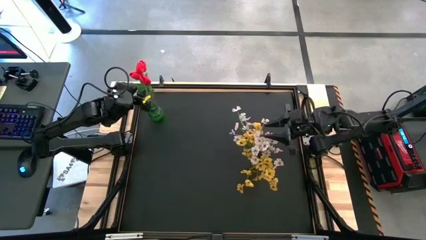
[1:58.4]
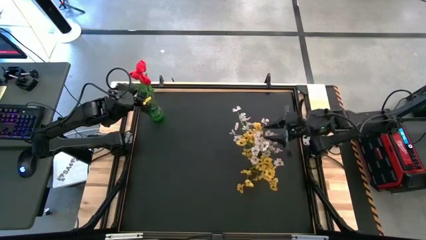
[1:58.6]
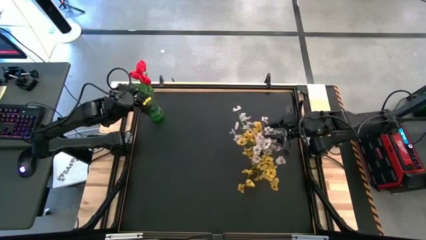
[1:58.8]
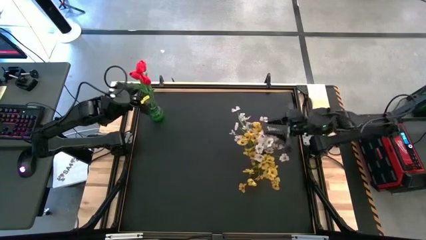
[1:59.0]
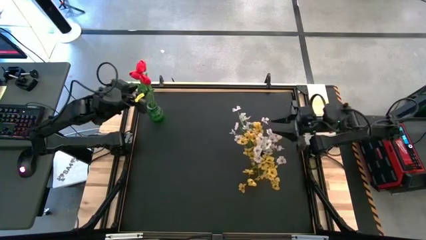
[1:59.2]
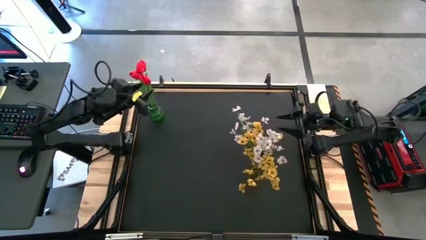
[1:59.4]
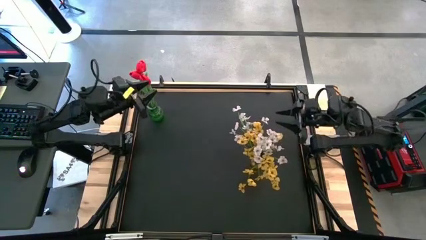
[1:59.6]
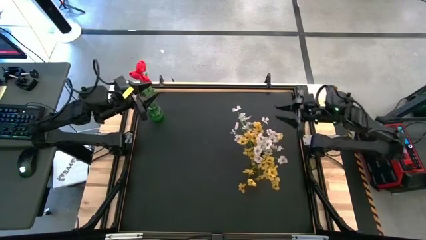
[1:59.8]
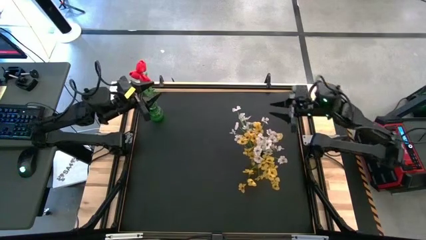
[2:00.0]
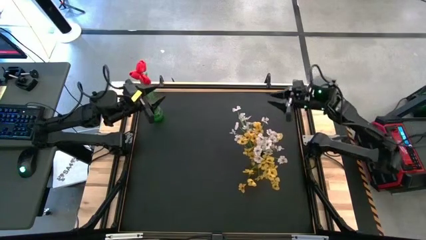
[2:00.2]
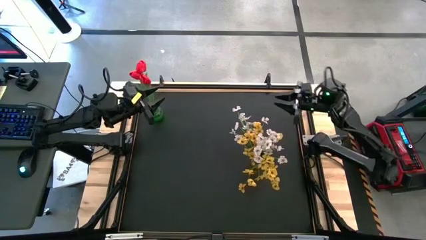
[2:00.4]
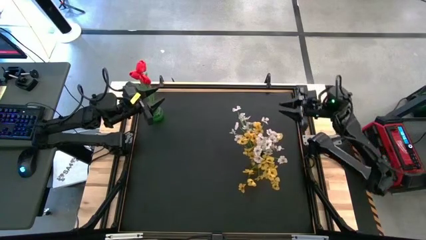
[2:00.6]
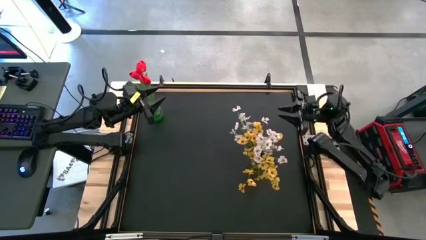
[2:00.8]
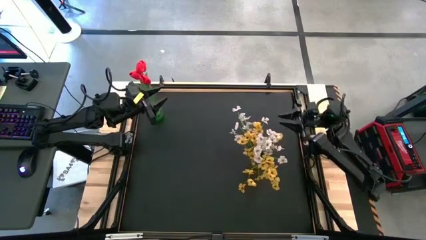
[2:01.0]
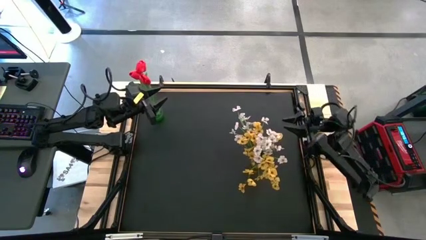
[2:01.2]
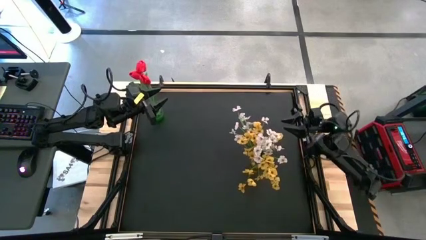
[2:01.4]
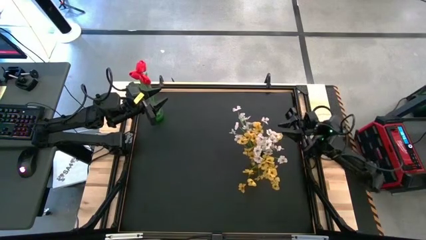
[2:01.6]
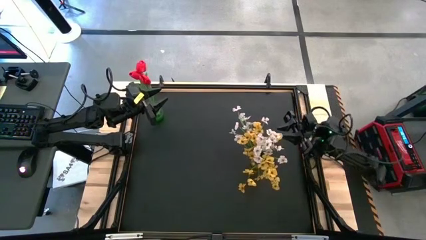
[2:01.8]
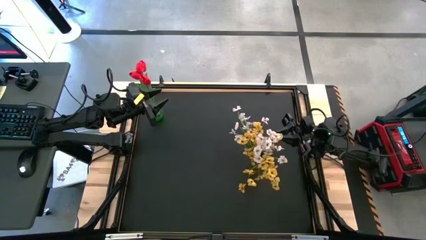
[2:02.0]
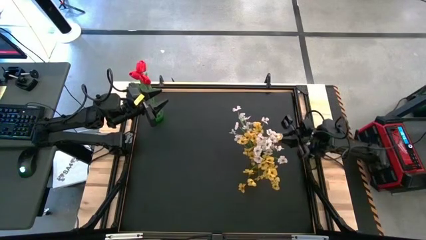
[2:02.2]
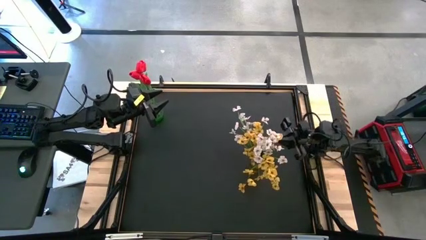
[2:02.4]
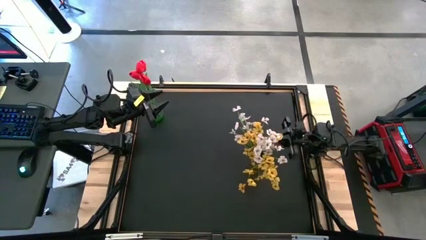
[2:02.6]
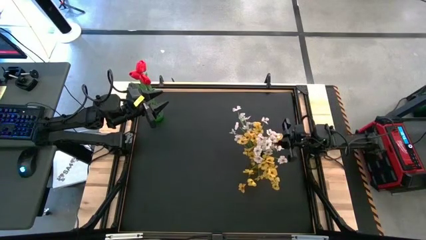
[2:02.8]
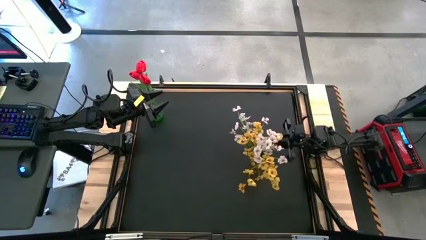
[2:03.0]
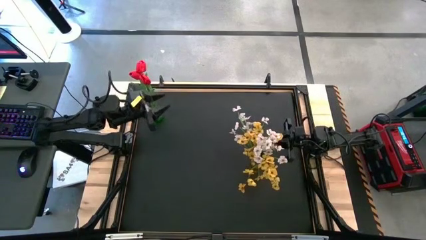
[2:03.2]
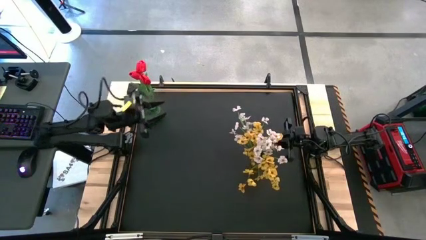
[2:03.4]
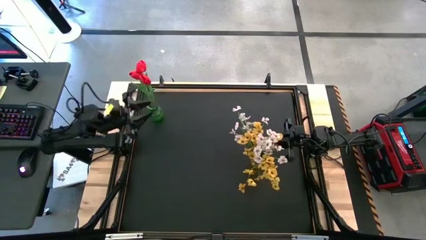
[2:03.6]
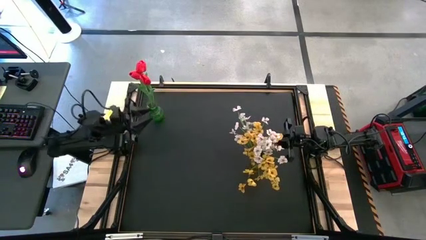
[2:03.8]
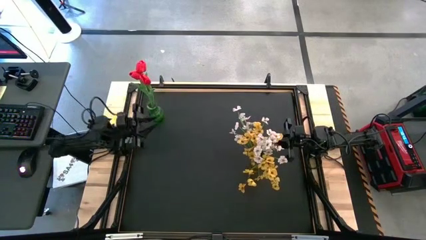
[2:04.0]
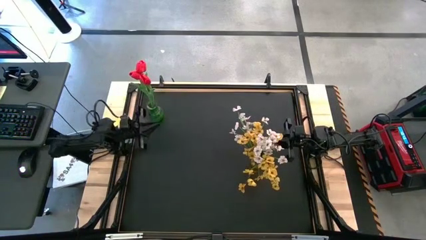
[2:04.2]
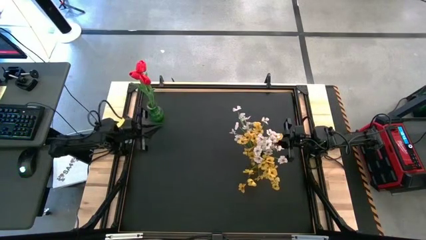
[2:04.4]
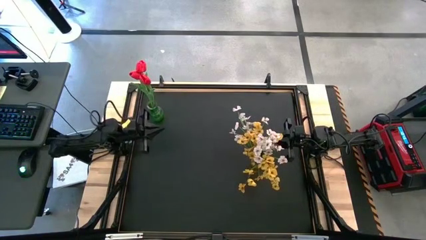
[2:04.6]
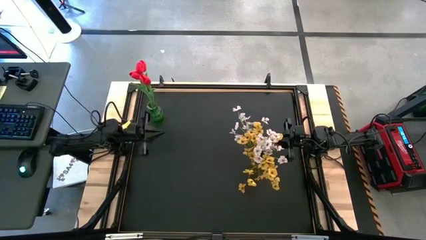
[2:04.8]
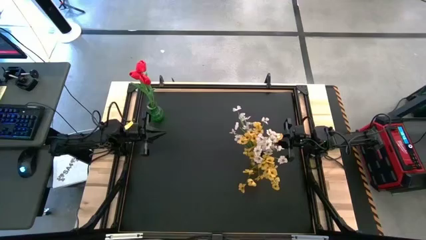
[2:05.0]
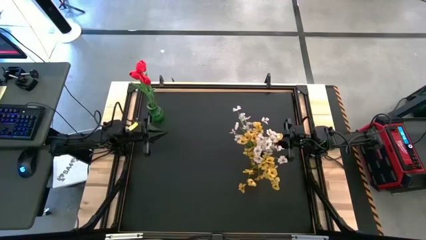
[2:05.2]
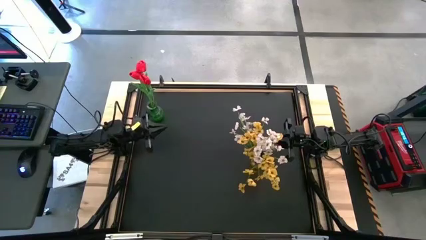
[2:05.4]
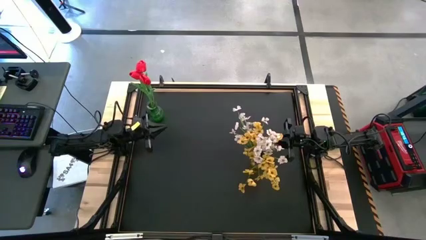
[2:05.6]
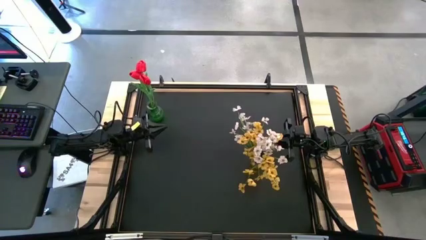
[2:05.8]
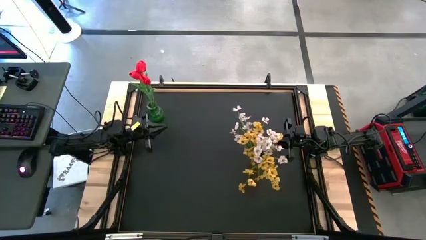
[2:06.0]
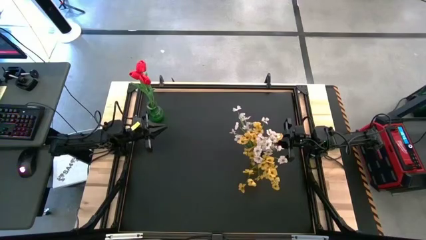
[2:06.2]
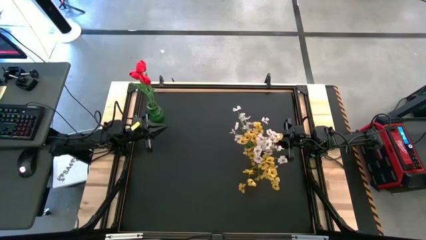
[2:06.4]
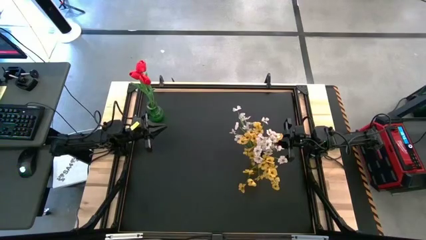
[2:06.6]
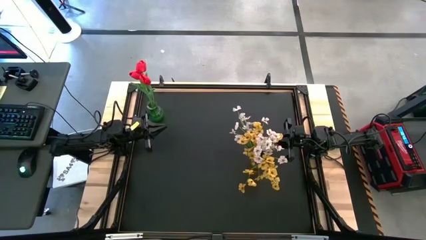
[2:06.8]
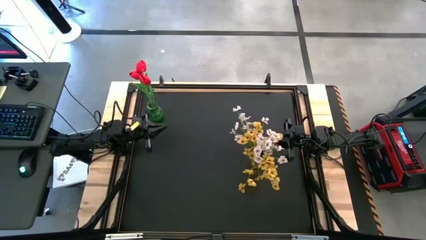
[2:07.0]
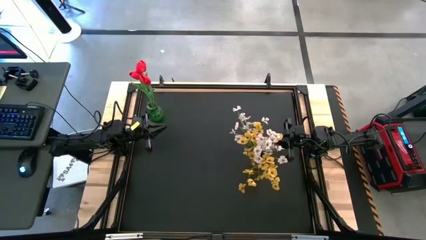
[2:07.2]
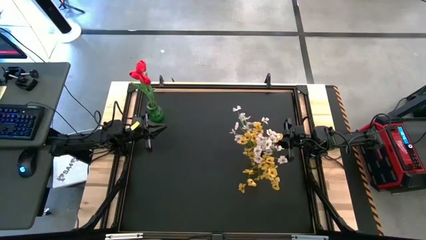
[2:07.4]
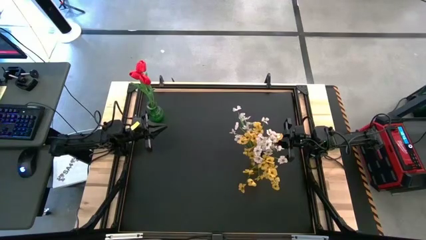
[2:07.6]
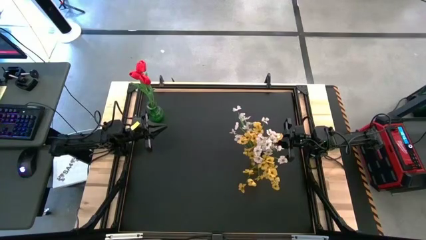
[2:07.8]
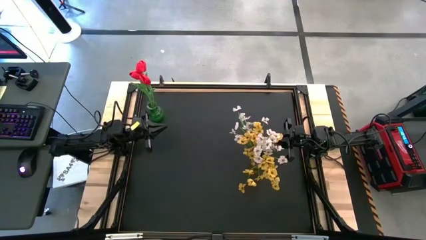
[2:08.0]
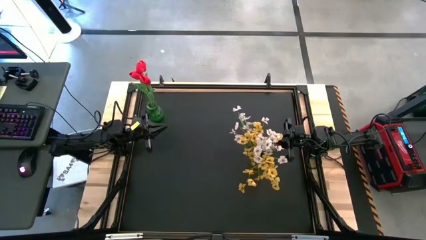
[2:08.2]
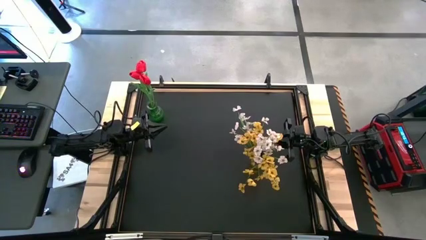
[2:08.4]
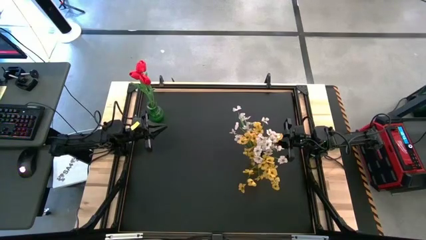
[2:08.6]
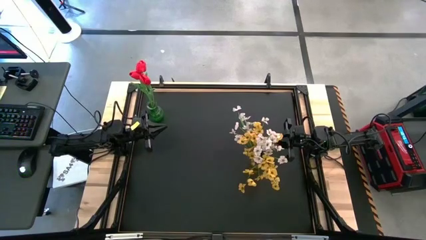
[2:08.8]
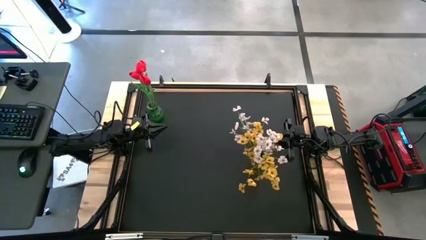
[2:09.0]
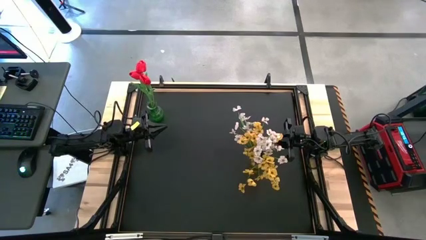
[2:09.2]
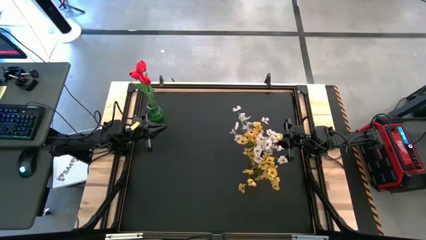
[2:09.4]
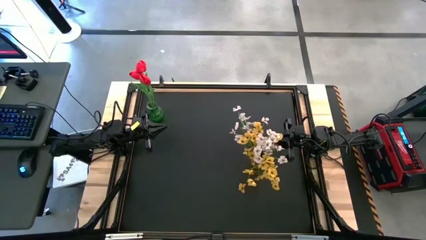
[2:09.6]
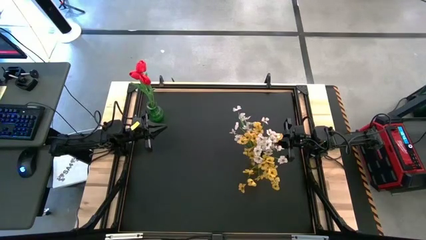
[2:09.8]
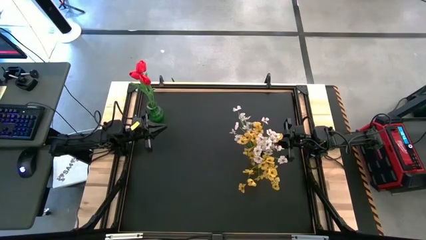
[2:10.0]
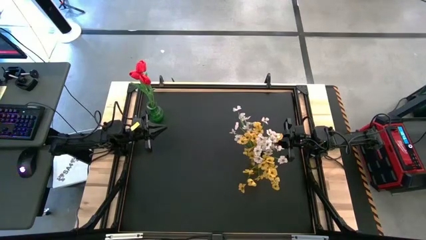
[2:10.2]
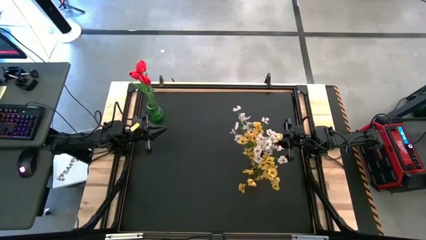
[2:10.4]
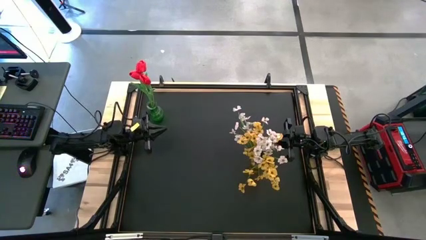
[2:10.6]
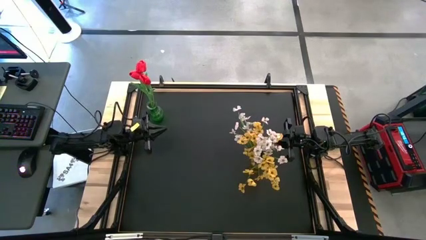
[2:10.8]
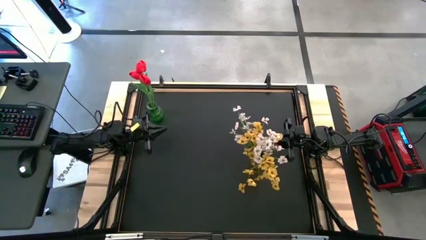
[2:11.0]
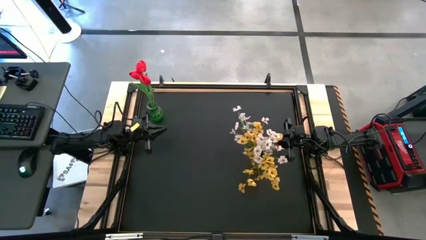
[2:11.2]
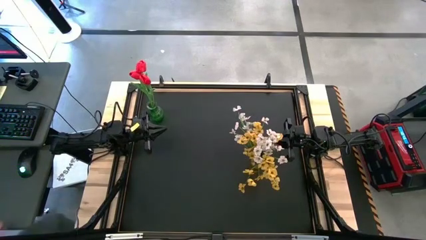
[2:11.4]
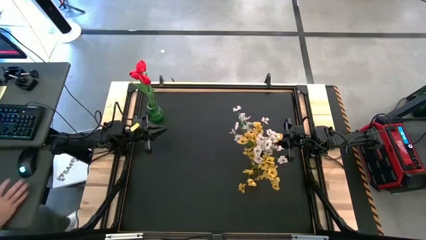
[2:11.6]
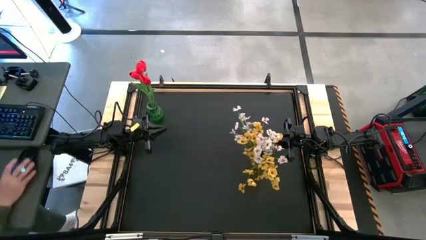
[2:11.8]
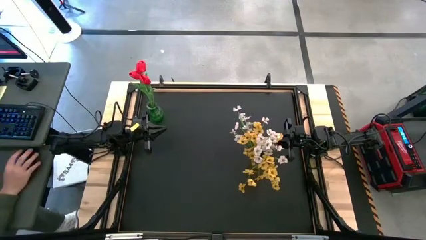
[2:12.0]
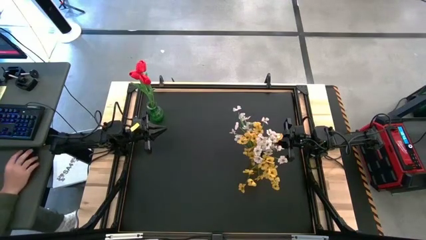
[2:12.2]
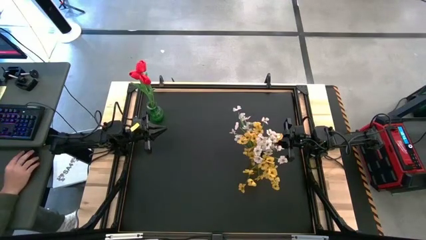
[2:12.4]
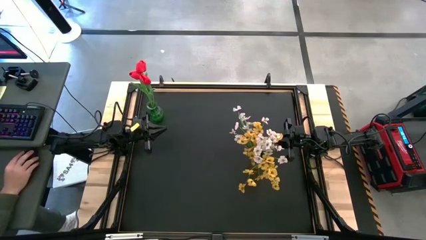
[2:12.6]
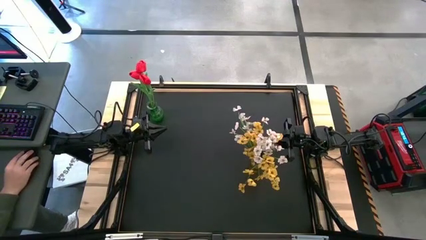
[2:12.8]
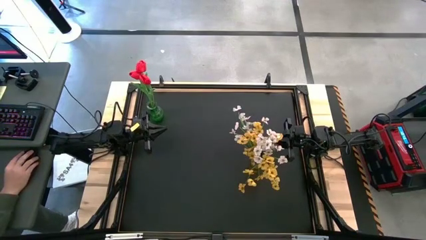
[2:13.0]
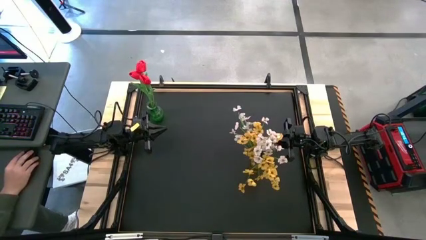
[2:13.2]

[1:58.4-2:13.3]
Task: Sort flowers into vase by color
Return to Home Position

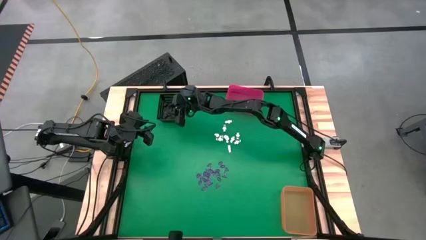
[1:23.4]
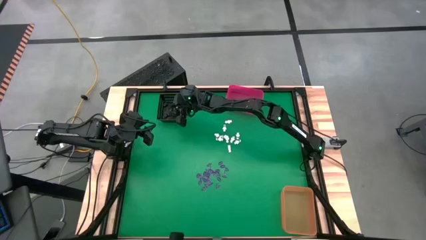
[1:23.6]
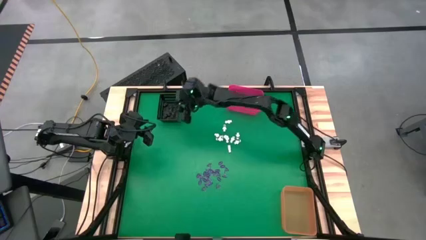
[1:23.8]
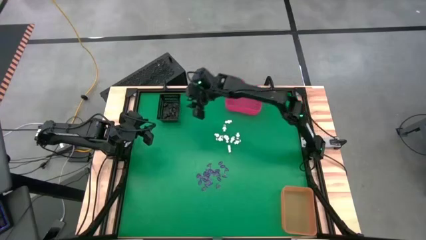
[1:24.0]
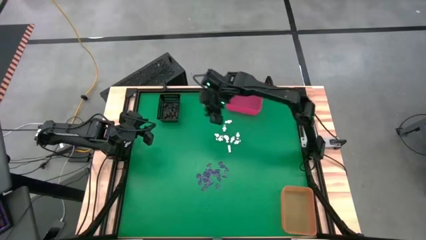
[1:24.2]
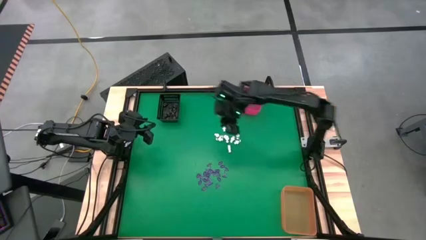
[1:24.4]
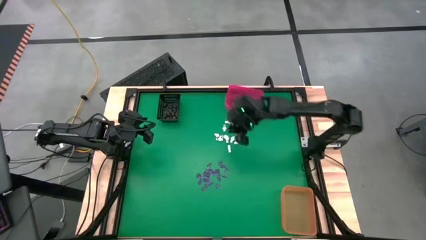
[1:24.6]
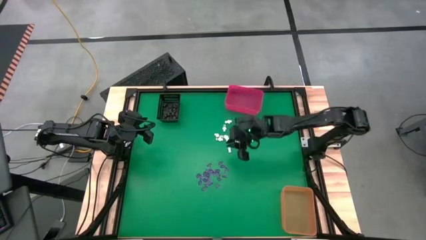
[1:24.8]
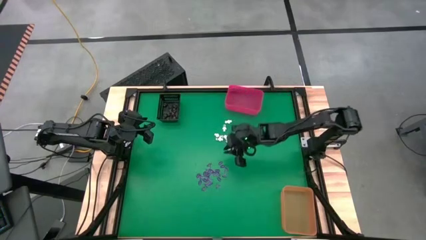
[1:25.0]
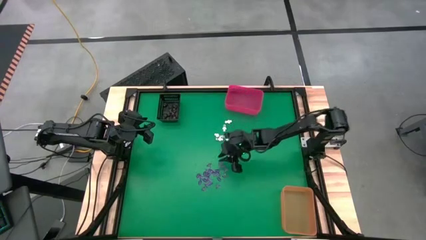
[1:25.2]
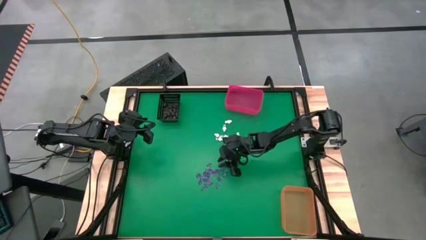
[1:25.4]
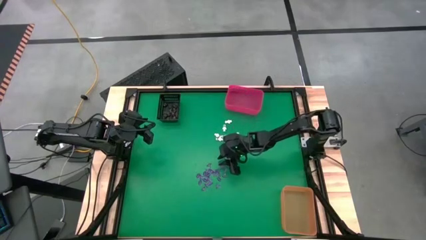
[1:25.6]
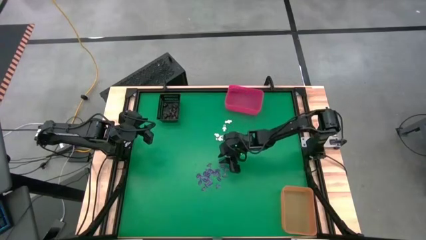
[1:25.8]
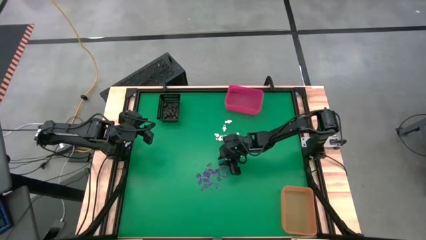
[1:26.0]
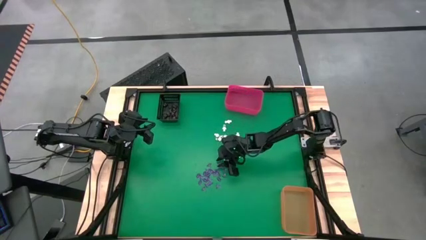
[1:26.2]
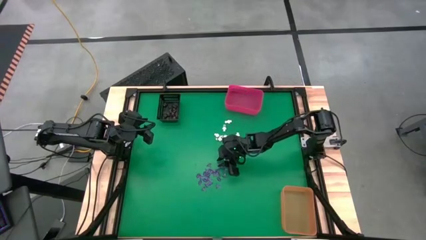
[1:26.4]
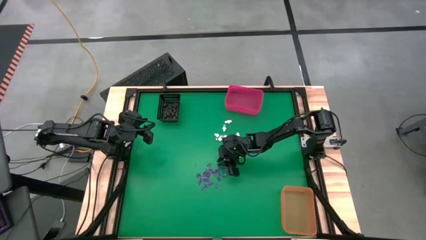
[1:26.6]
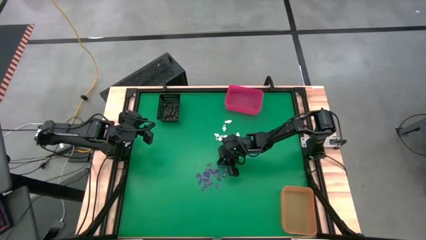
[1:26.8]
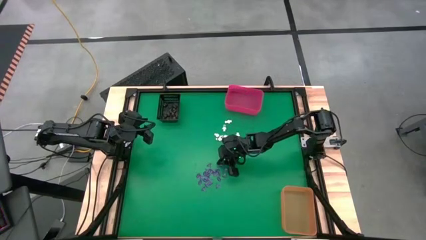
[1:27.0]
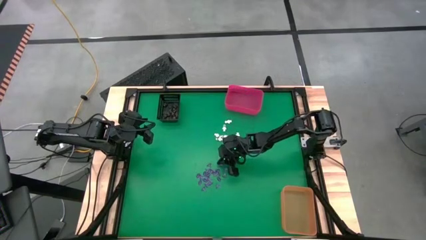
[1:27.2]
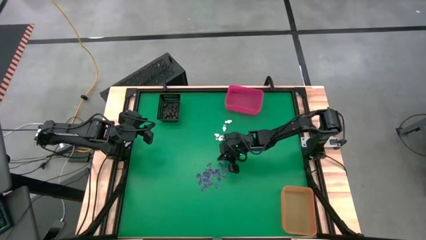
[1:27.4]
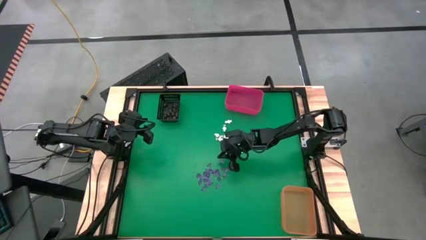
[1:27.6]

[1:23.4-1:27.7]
Task: Sort Halloween decoration
Put the pink witch hat toy into the orange bin
